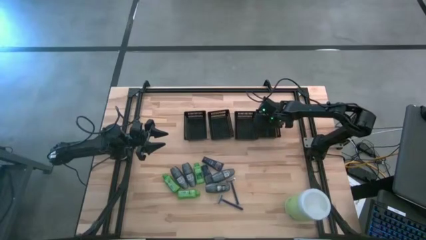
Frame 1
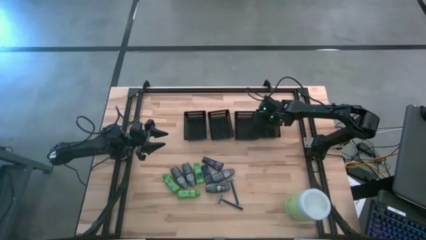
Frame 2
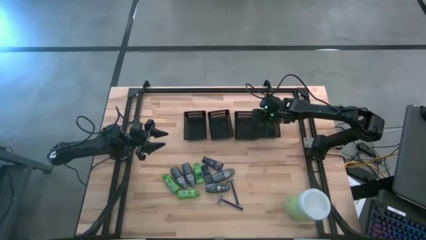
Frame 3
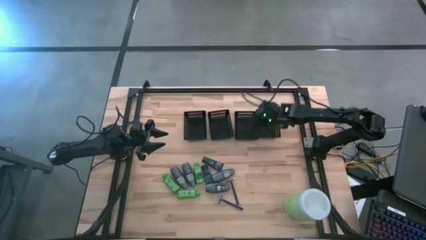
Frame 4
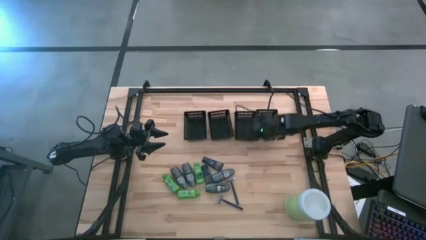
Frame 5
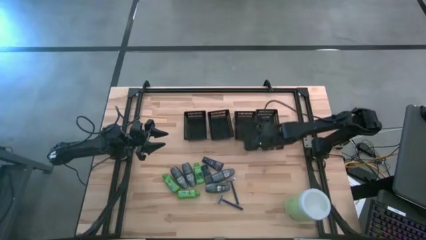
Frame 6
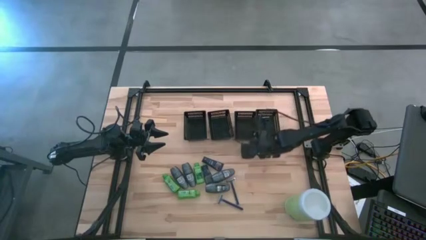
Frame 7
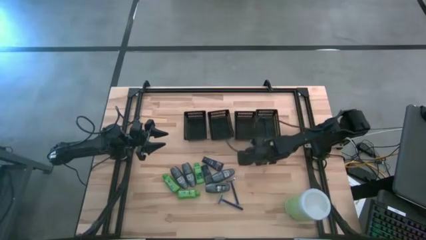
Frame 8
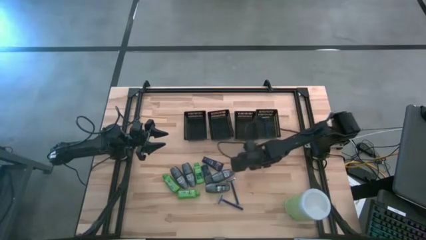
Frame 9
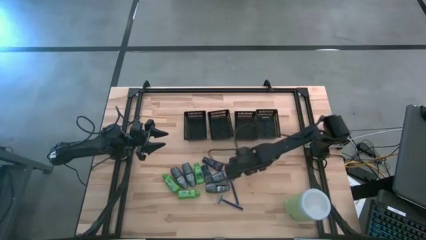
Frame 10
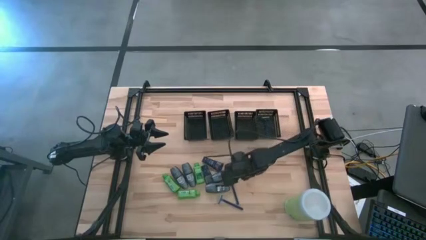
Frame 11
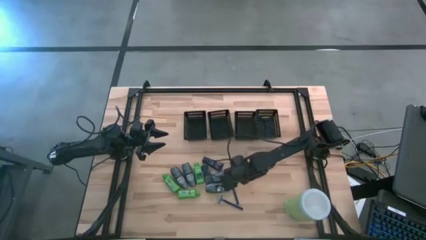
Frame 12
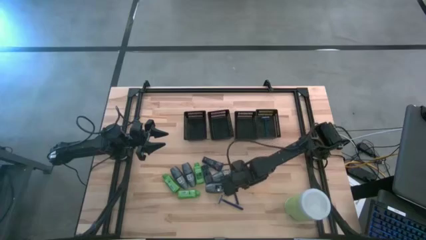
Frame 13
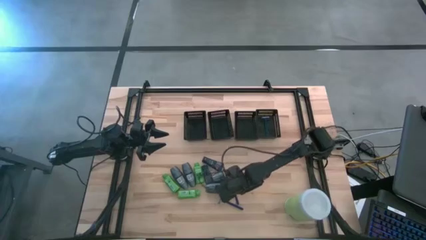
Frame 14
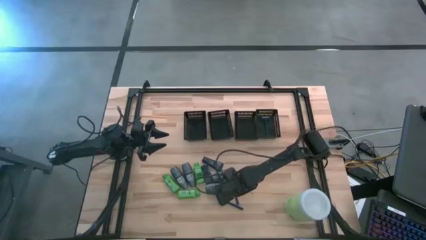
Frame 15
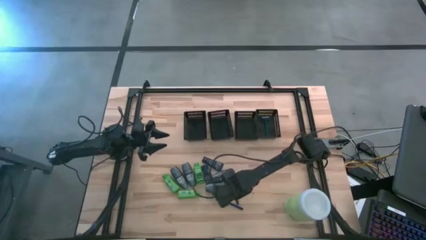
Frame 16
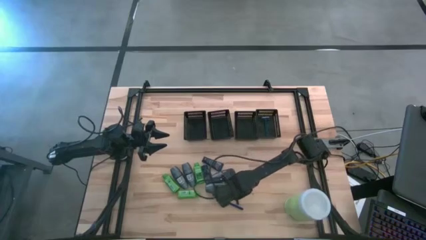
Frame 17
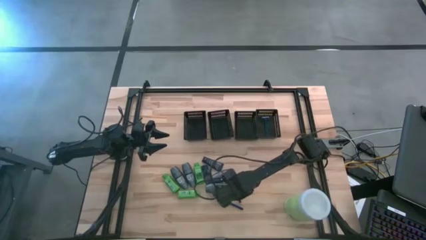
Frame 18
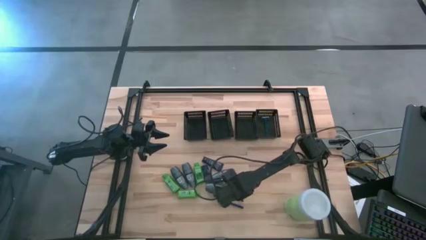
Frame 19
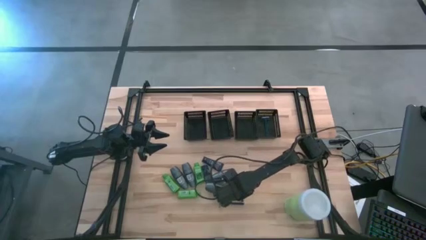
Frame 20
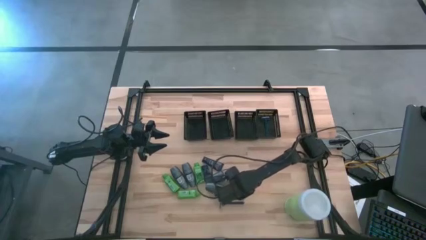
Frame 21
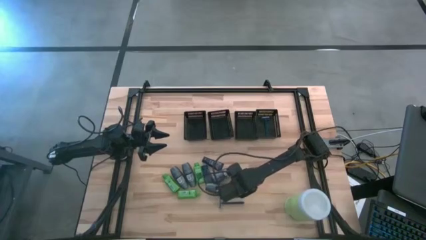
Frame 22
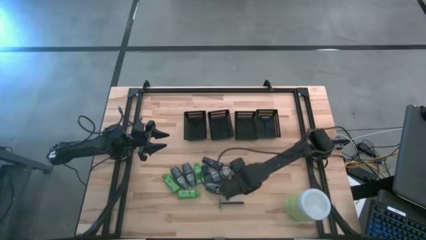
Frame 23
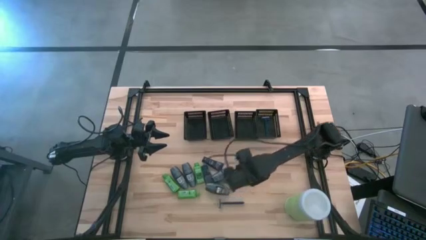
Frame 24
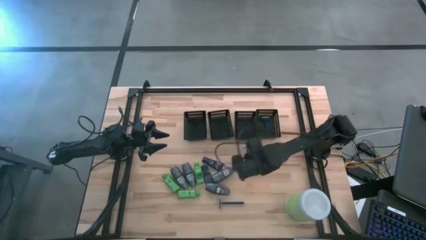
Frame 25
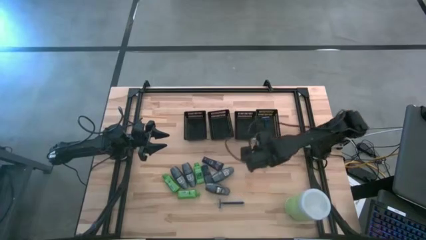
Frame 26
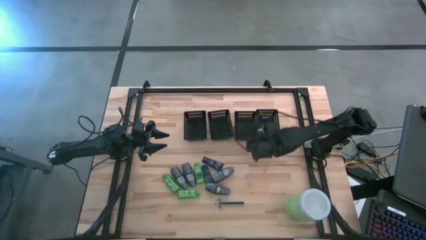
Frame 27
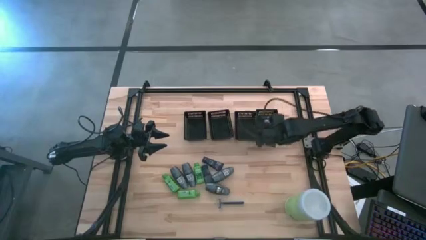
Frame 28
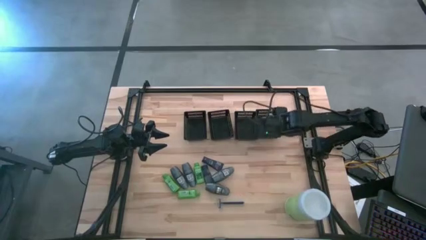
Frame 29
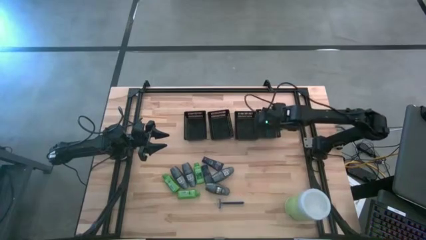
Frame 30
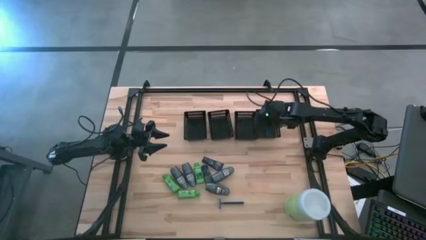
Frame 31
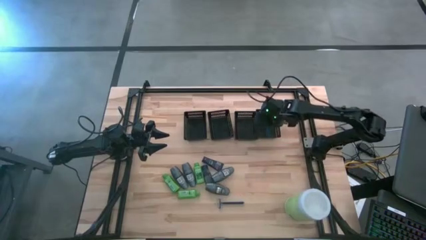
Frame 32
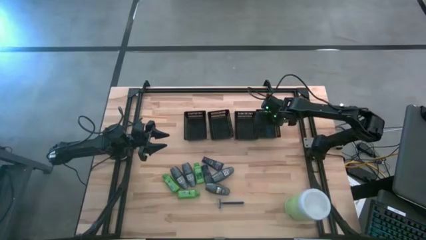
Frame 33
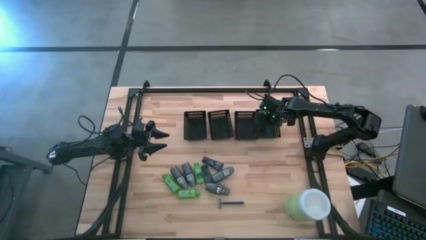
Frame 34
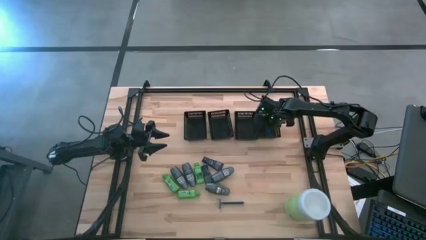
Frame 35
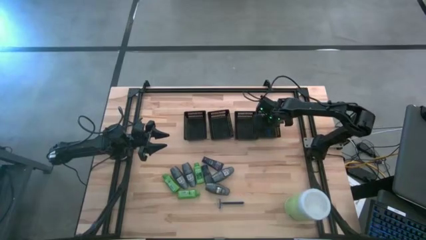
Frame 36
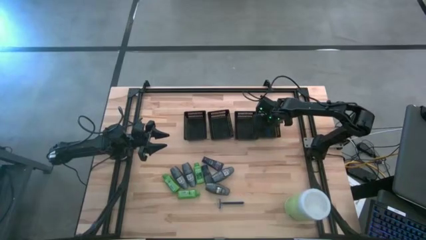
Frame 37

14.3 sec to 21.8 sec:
Task: Pick & Place Travel size toiletries
Put the razor into the right black basket

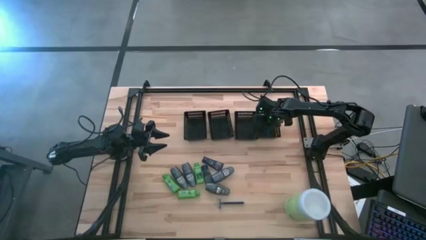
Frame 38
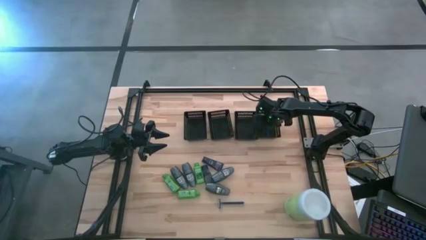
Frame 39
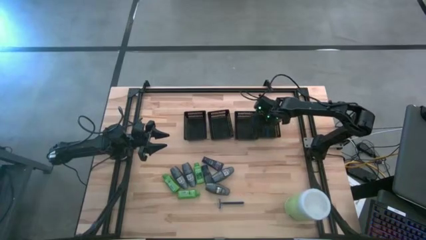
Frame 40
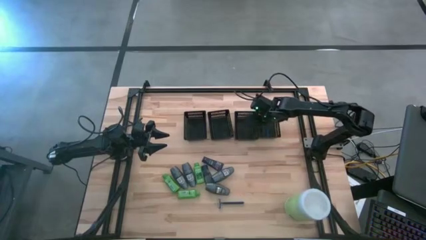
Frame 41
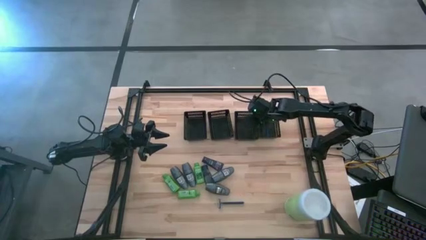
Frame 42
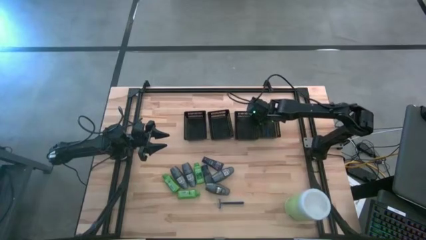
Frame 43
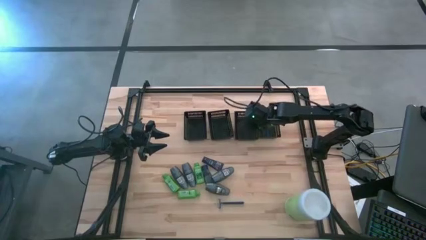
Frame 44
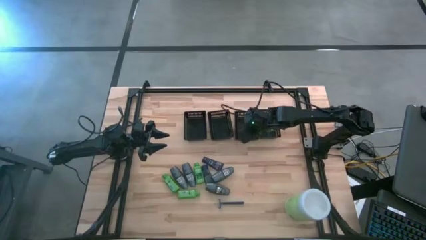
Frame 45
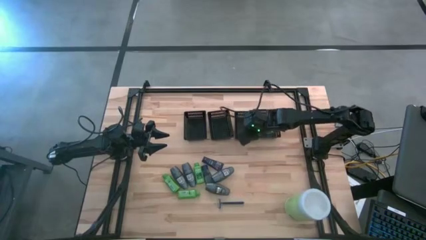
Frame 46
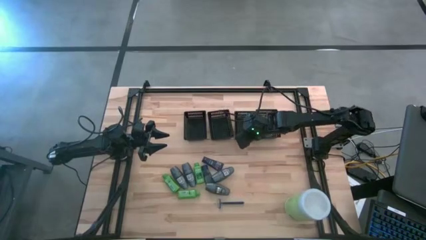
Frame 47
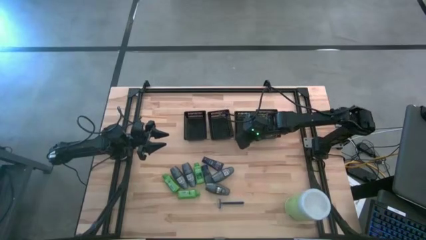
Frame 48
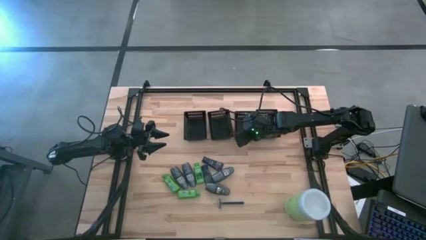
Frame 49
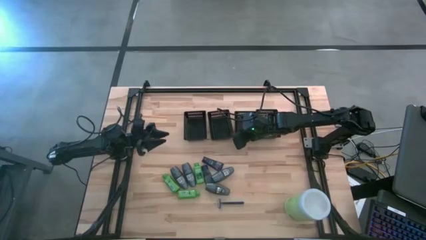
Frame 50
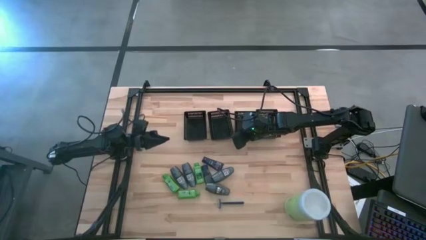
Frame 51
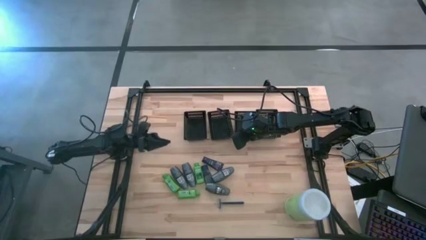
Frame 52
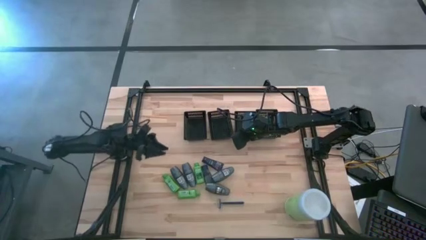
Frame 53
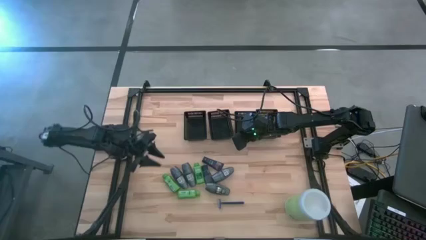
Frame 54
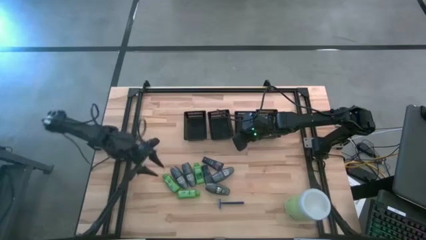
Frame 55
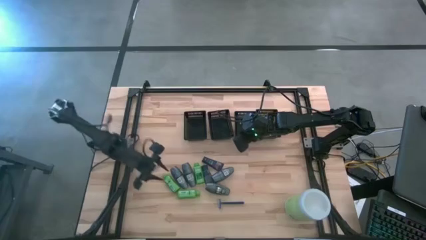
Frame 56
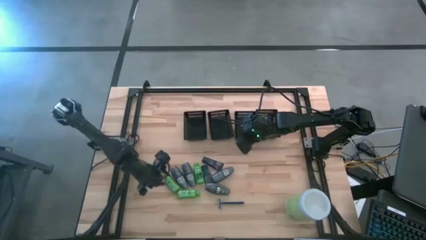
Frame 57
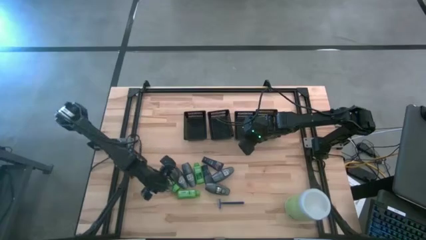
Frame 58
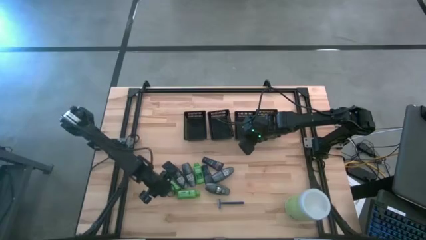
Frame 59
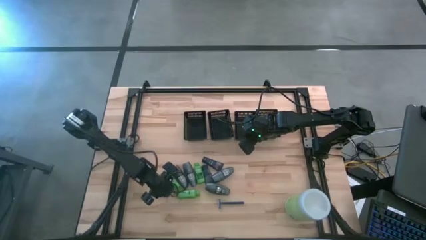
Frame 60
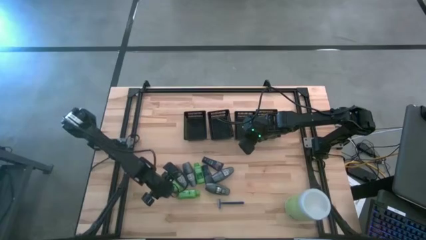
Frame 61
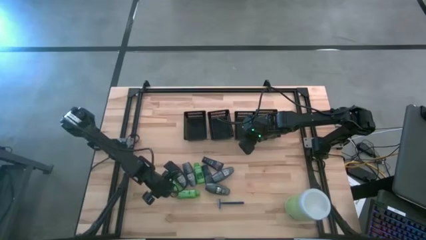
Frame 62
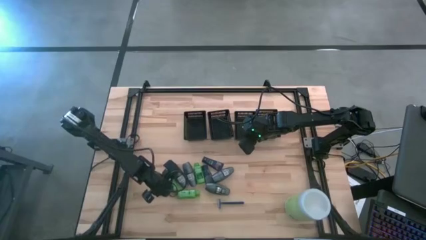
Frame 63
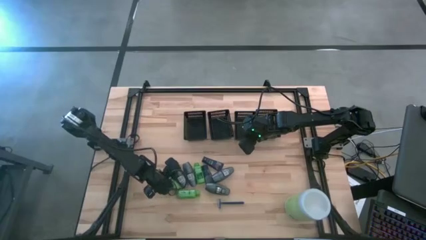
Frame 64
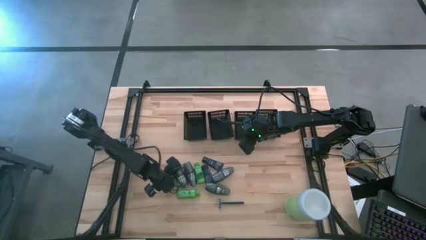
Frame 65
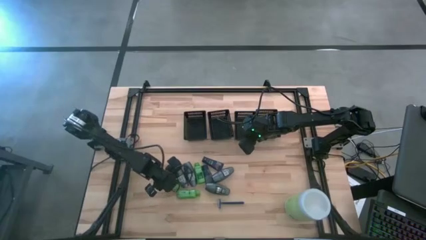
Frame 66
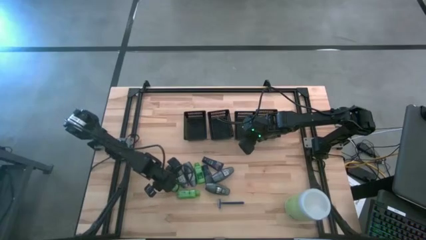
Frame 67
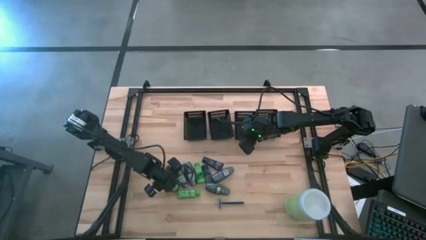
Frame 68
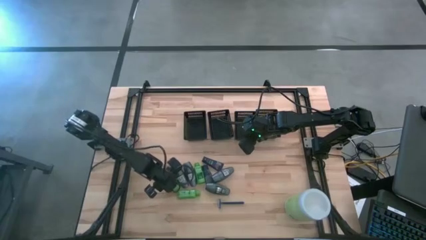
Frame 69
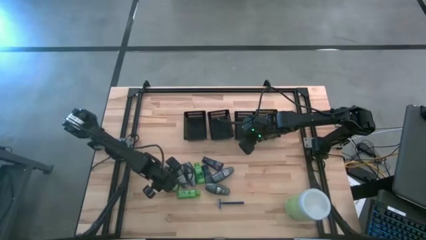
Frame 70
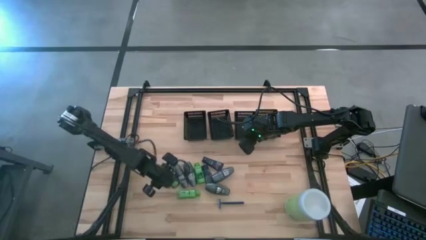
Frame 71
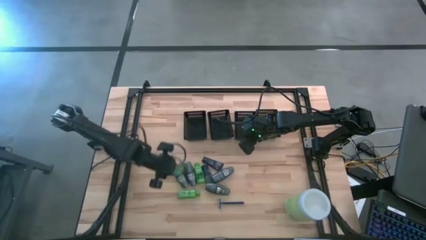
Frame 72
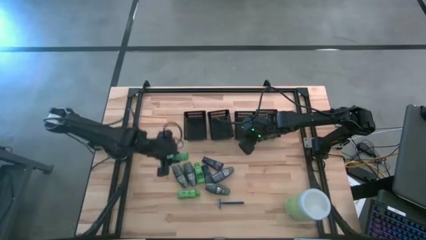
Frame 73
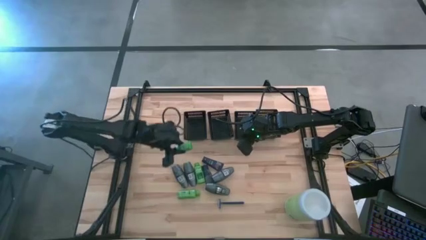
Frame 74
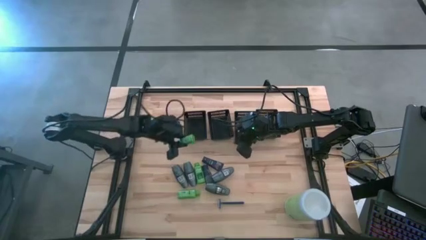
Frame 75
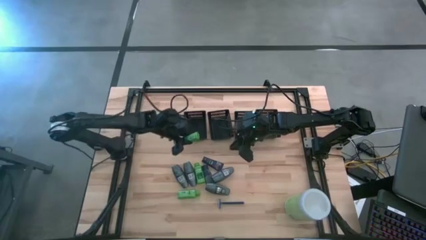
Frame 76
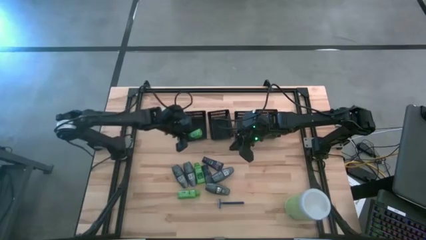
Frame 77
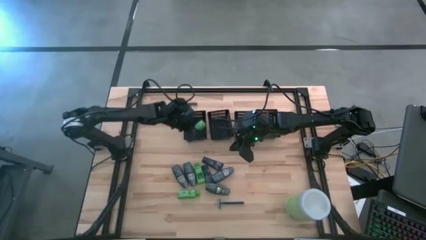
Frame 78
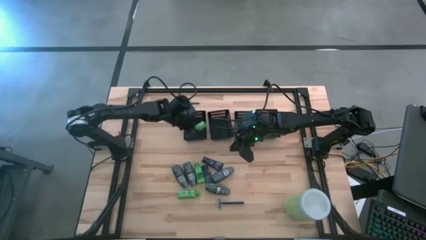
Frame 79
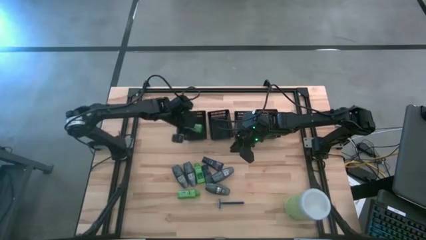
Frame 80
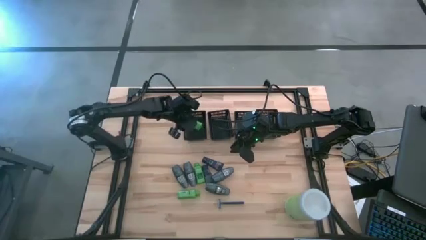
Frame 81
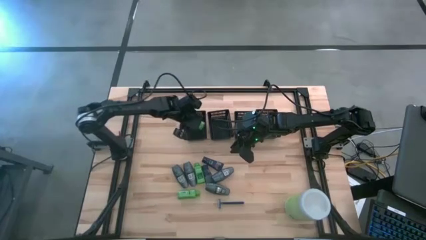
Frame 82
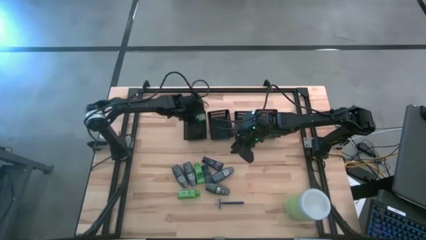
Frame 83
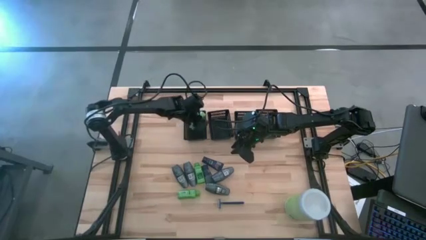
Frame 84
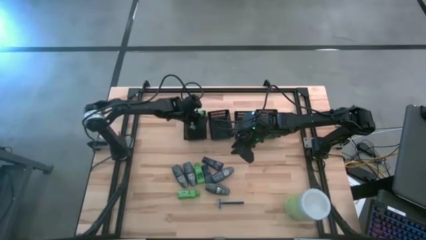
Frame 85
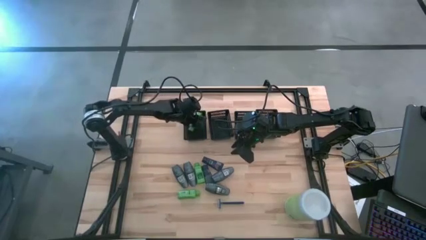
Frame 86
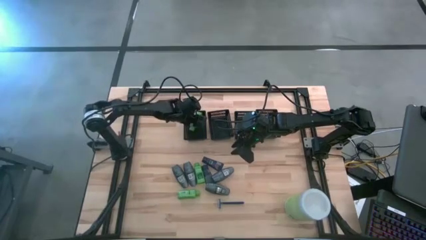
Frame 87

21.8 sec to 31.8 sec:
Put the shampoo into the left black basket
